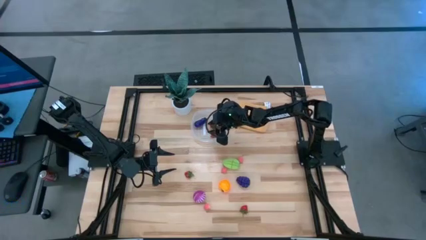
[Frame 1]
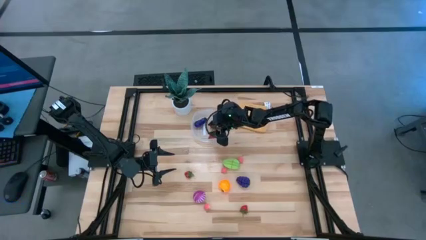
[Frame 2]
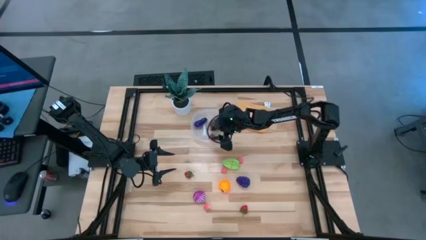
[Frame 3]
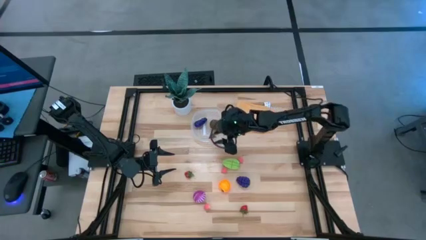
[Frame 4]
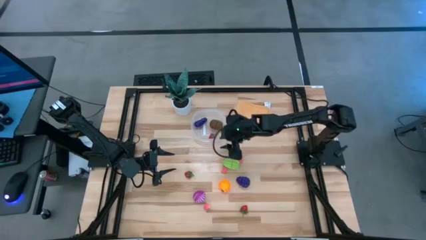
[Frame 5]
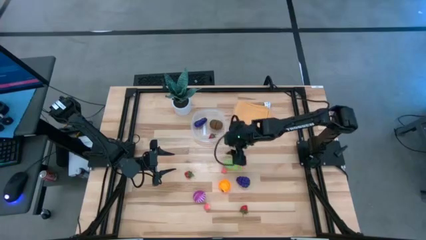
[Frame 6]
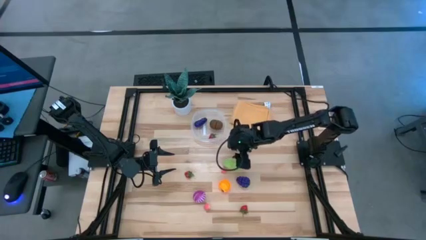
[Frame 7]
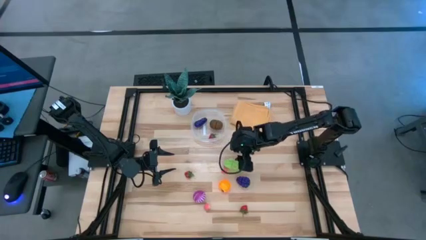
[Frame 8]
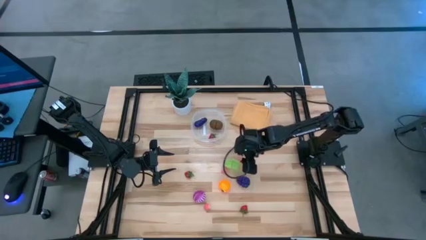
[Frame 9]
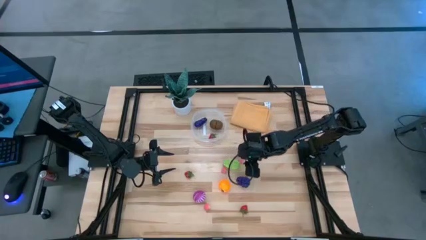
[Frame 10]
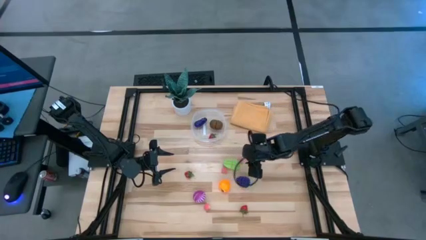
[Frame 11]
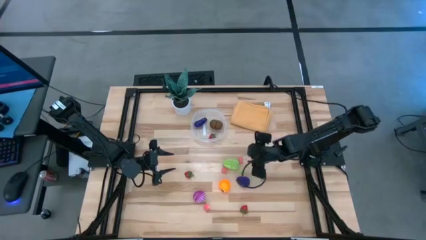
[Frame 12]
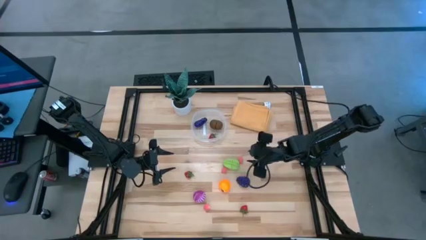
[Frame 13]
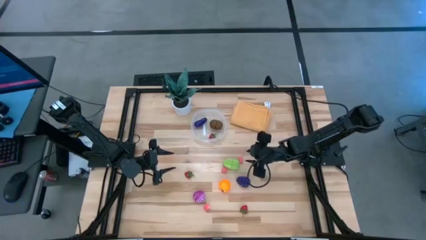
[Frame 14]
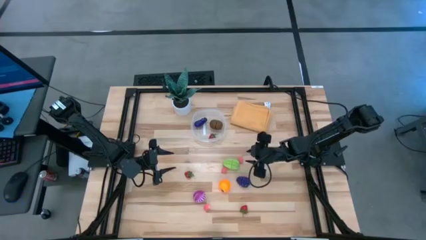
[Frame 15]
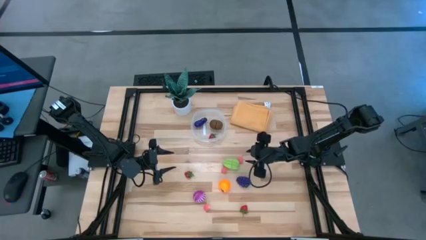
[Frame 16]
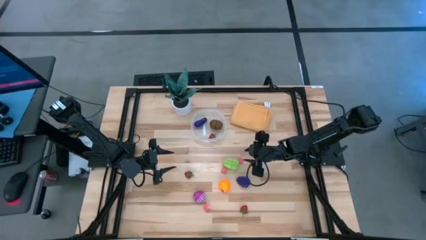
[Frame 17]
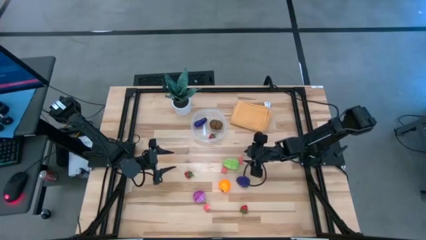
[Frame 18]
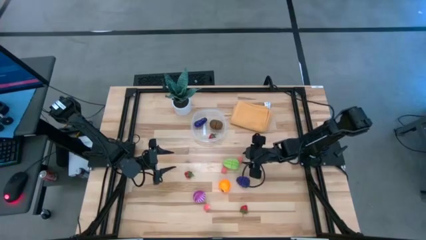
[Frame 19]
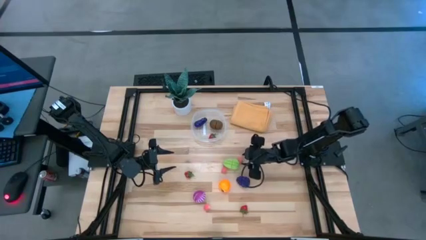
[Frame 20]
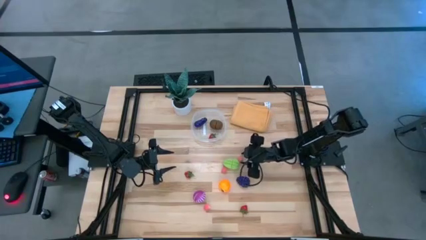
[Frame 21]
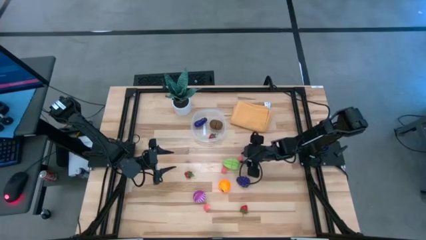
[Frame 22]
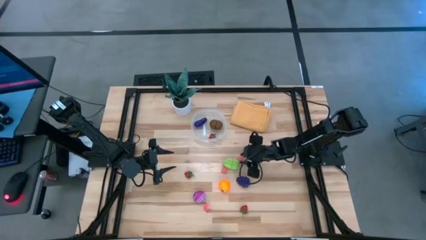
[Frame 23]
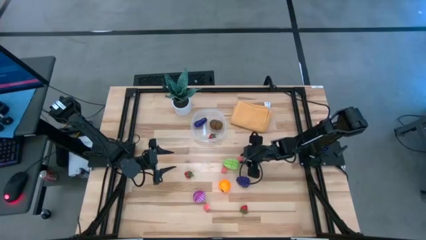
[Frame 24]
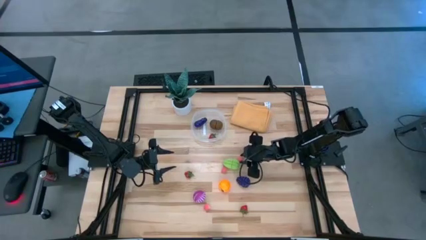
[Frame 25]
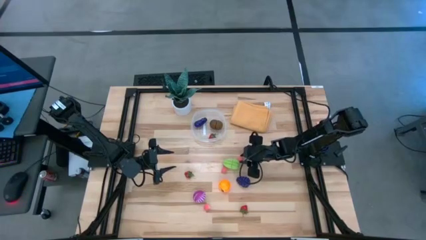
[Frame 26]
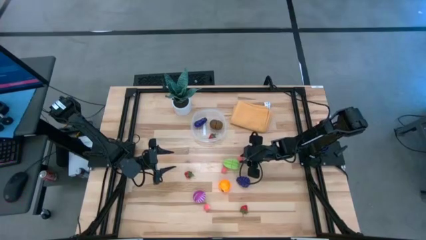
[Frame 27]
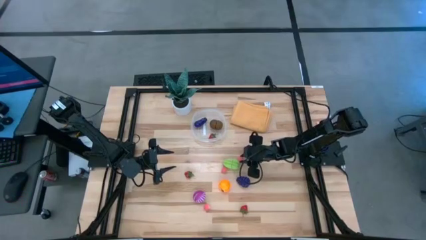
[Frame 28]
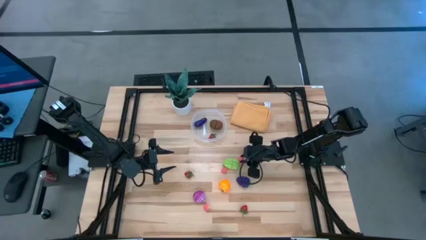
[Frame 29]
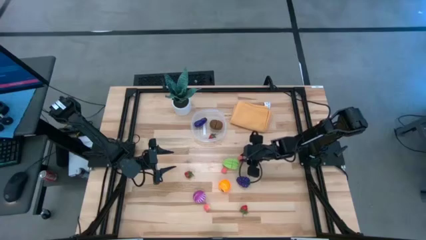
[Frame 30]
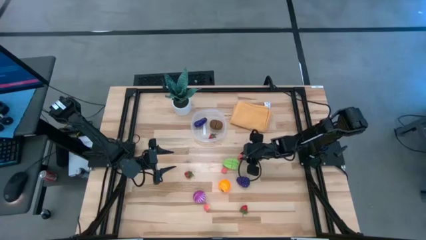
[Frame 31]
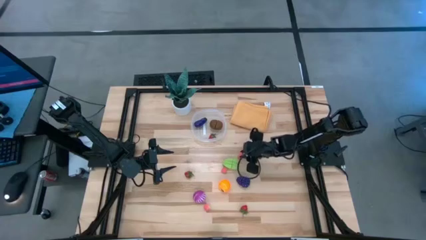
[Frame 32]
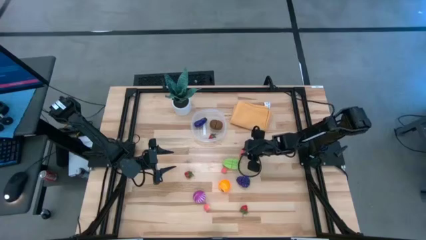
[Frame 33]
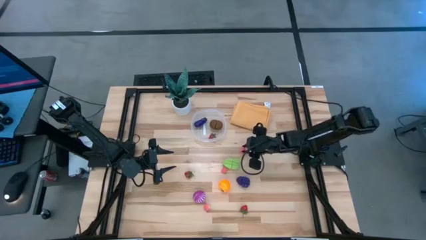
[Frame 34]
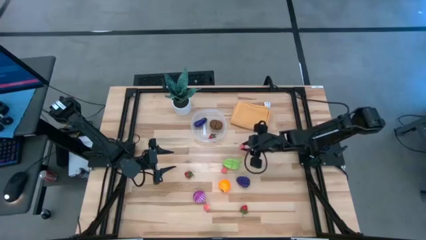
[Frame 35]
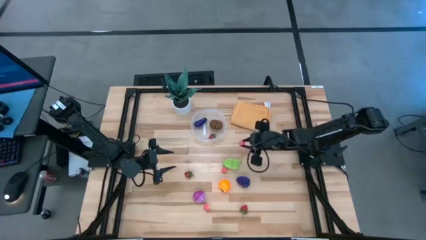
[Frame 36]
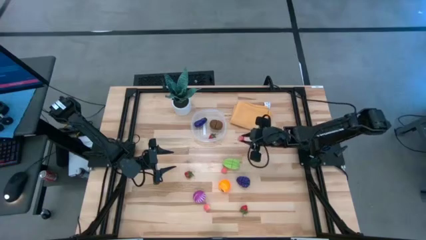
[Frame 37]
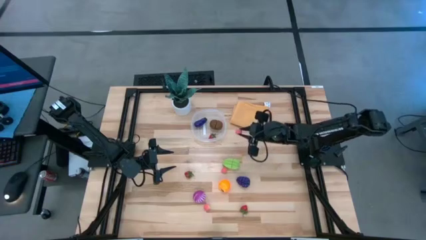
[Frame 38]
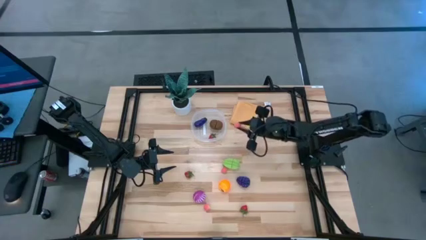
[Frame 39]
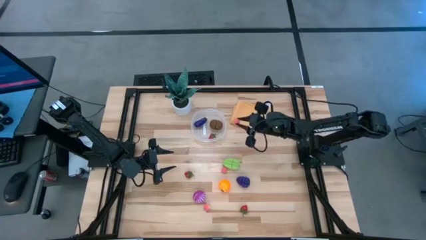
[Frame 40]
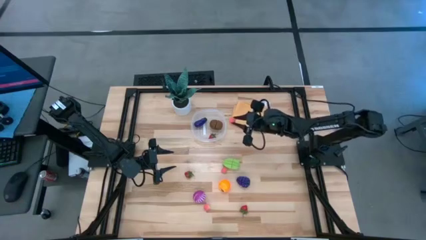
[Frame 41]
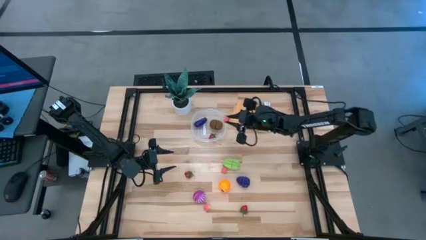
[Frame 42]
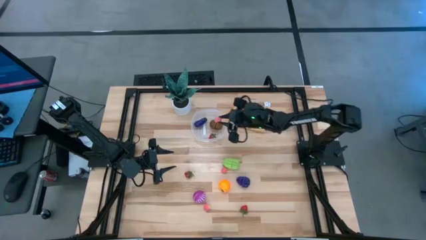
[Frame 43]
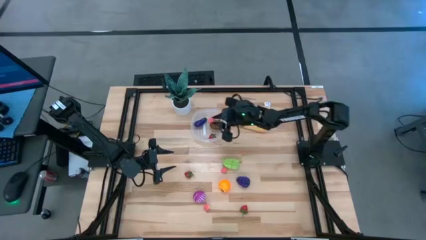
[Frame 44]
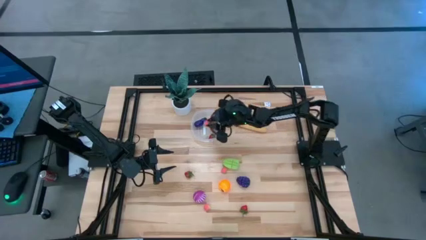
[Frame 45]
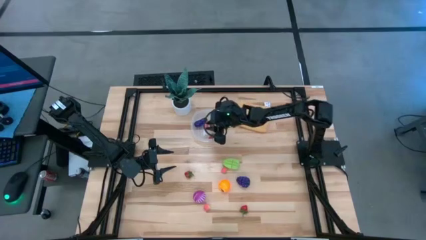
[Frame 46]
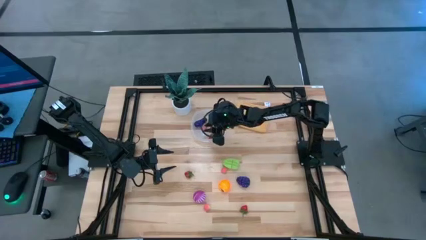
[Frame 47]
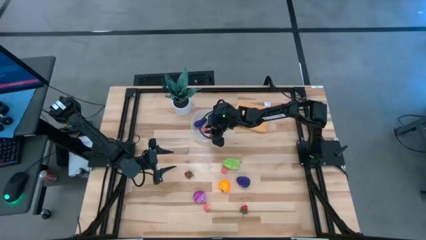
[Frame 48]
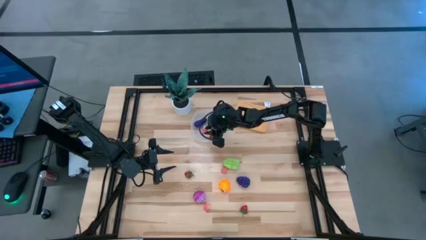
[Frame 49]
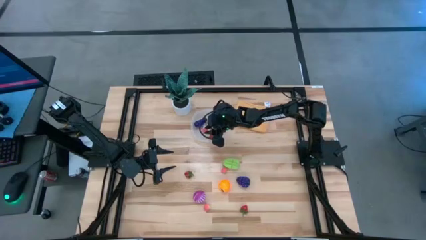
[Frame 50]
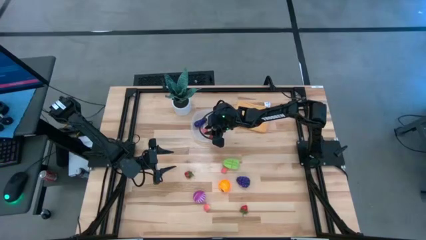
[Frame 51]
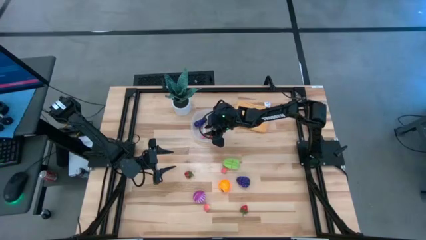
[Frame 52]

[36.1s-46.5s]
Task: Pick and placing Produce into tupperware
Put the top right pink peach into the transparent bin

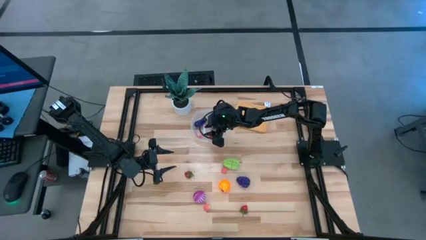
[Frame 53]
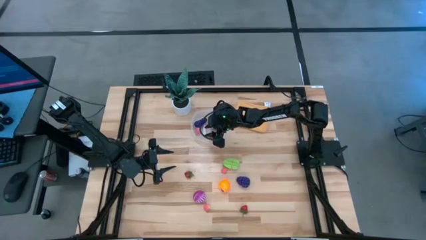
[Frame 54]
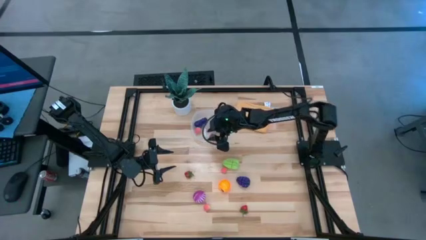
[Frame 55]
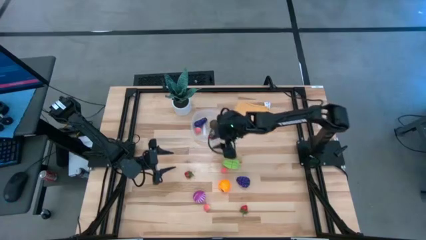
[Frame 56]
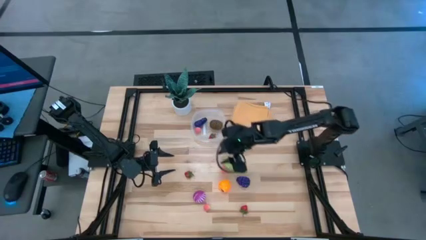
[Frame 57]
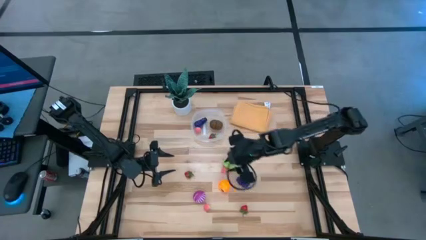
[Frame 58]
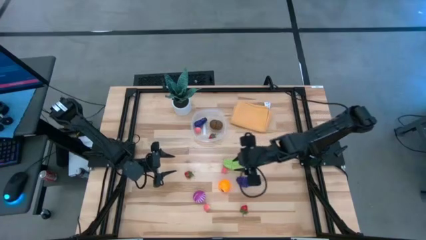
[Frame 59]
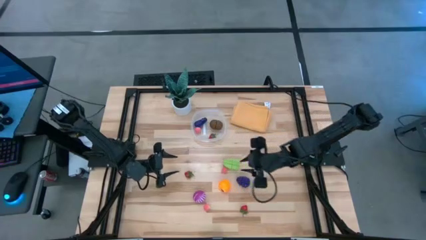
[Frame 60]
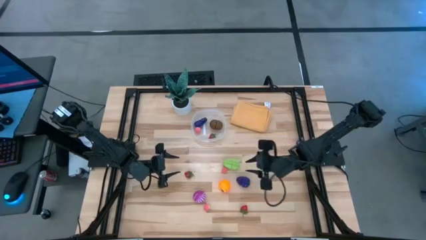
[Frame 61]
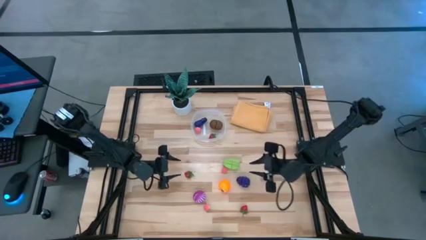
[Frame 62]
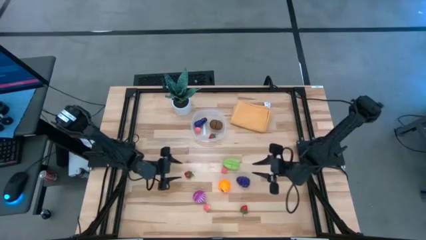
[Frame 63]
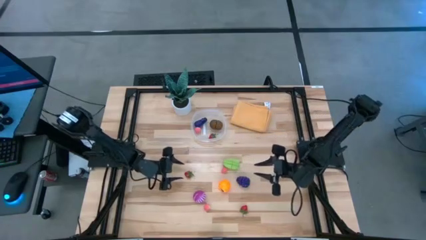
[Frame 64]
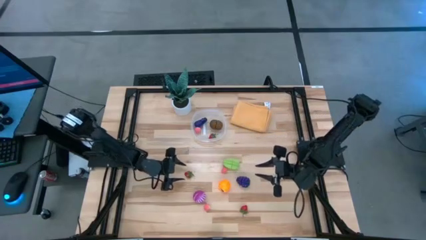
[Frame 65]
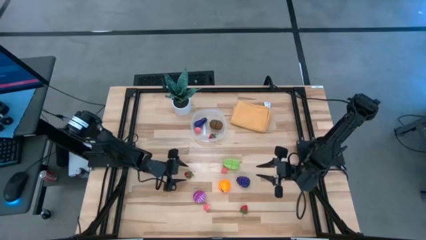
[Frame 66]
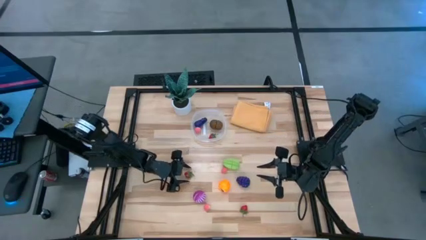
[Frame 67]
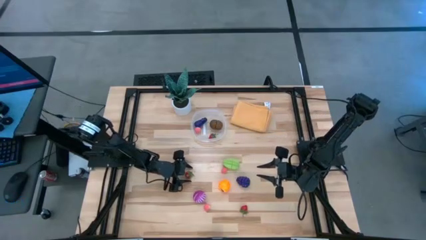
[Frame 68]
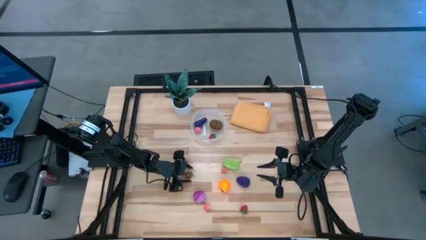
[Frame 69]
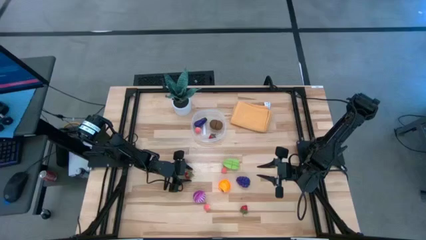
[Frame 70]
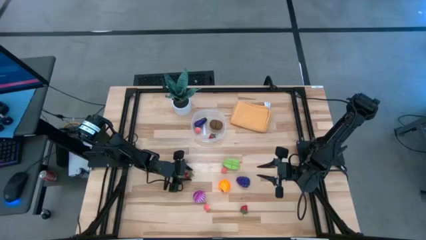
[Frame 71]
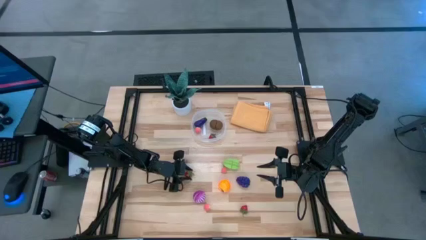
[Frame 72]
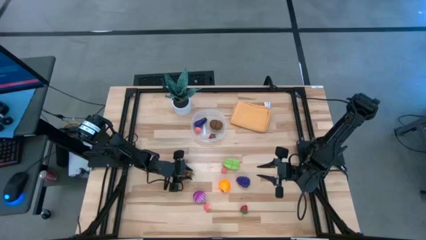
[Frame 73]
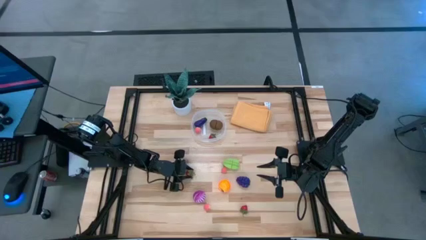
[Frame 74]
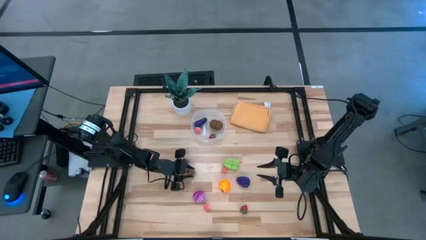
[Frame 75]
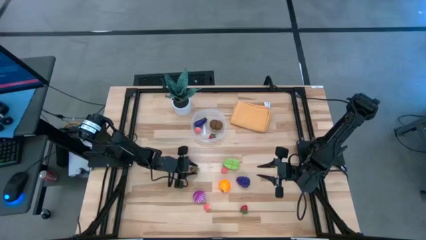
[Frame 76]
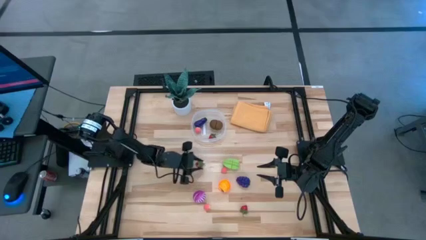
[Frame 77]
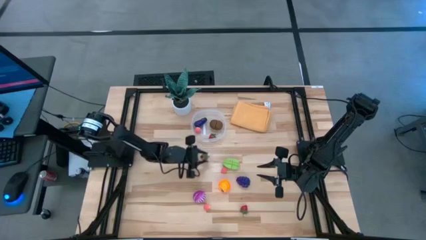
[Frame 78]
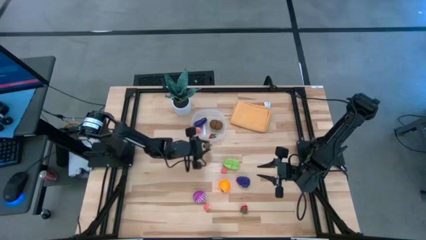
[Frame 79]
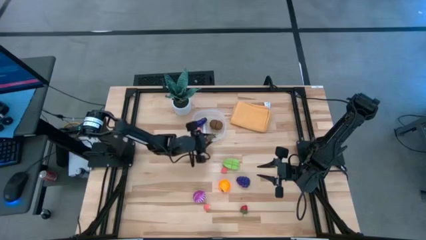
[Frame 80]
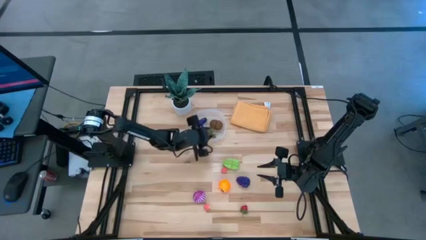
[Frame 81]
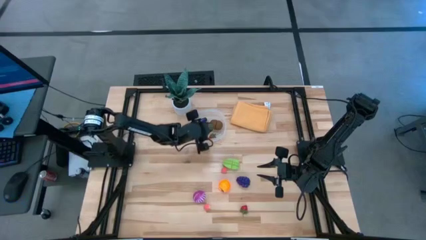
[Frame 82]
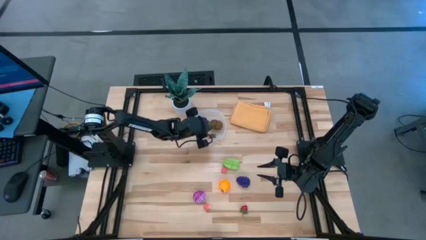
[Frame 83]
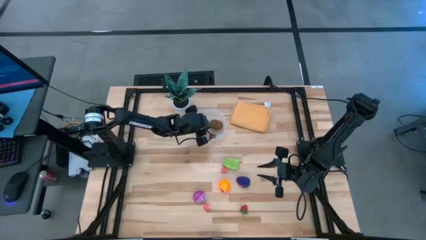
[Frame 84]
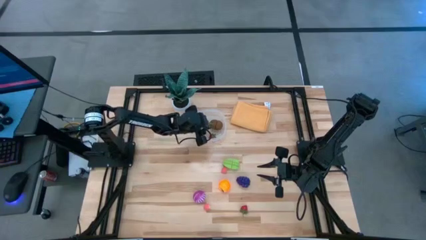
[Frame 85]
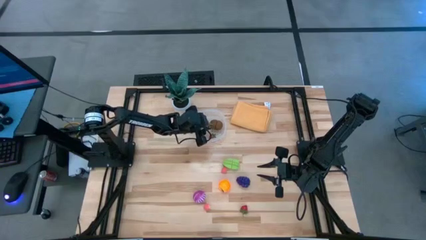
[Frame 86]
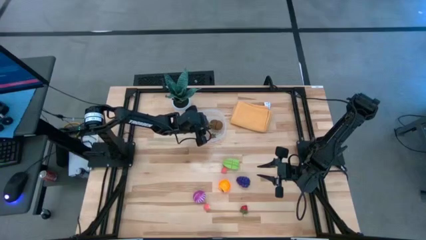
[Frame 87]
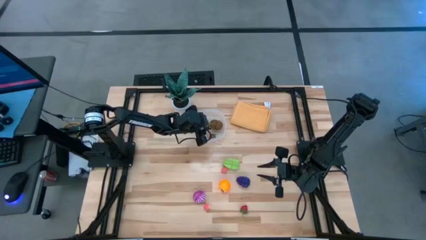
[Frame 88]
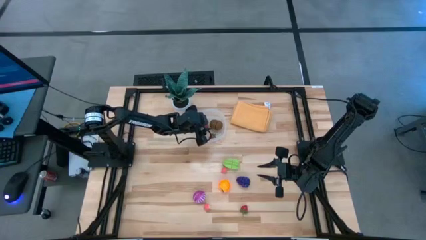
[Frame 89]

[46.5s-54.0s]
Put the top red strawberry into the transparent bin
